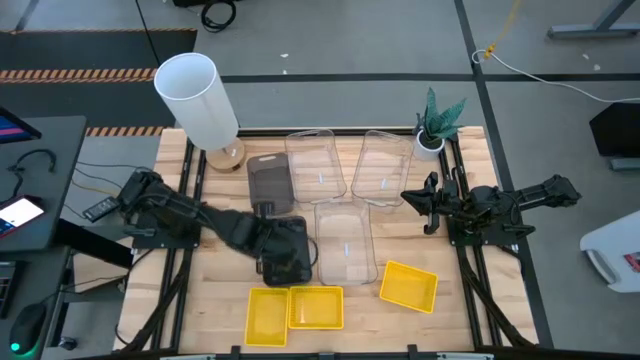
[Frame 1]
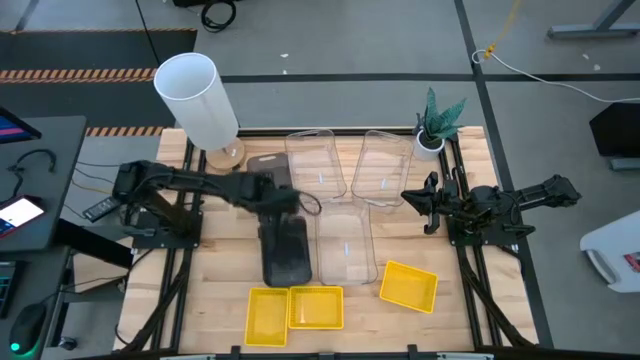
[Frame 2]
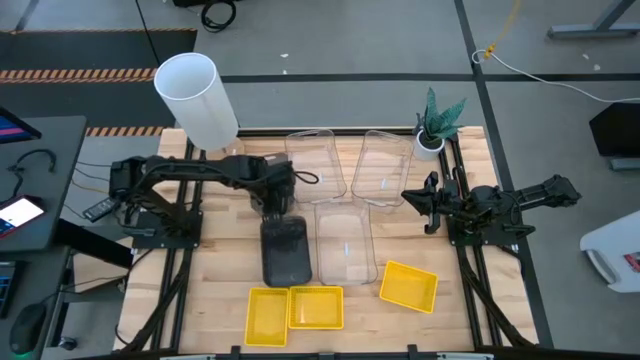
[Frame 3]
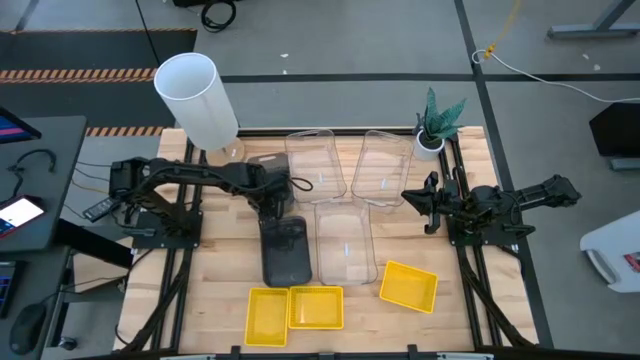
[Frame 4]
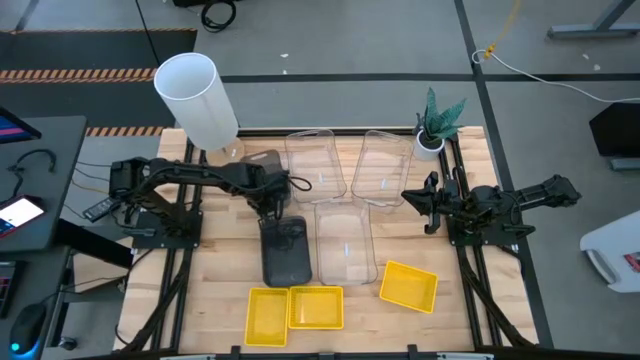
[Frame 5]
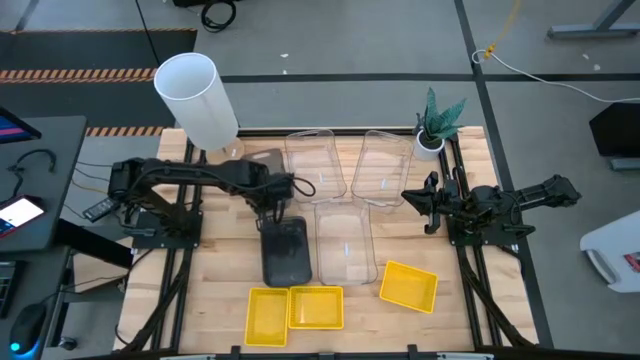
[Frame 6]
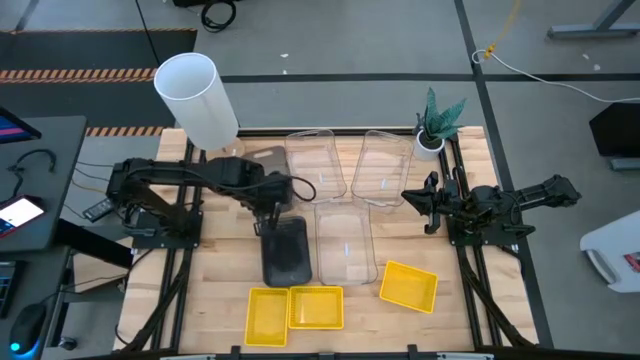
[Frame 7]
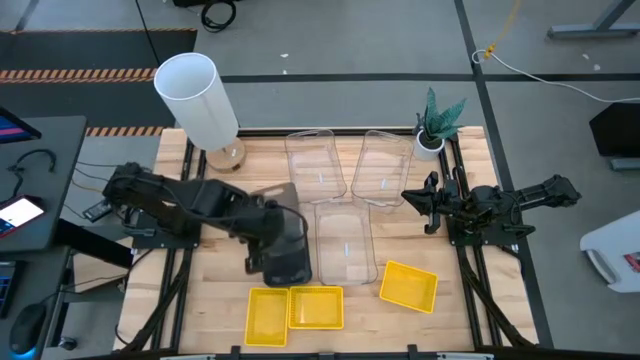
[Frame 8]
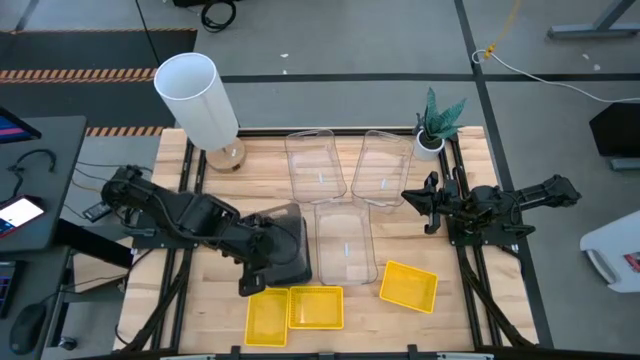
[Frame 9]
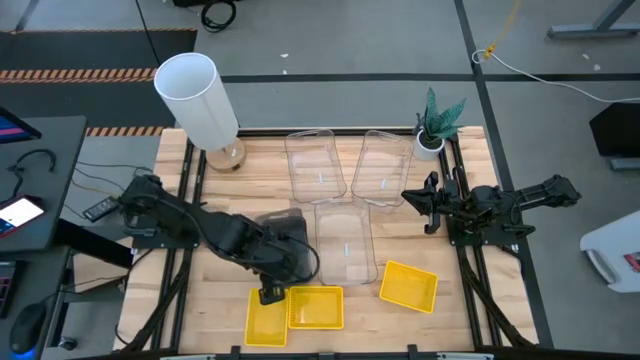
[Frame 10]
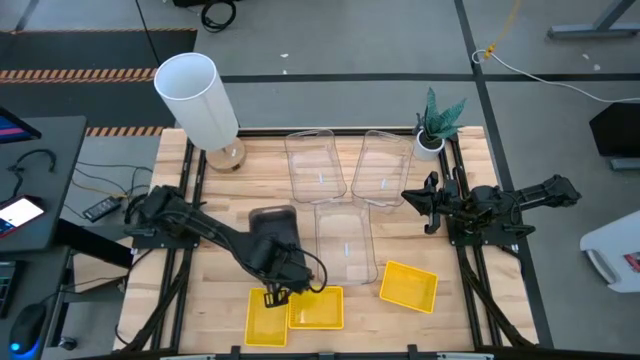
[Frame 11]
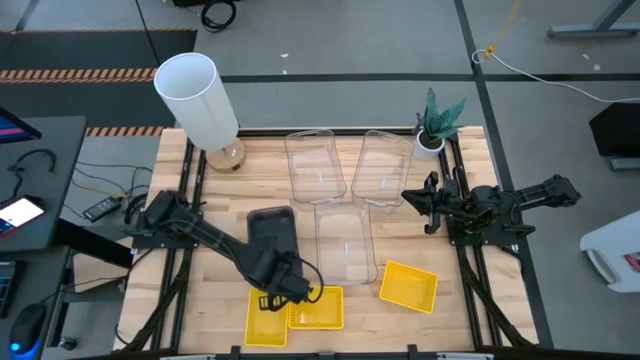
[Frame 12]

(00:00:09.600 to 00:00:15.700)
Stack the top black bin on top of the black bin

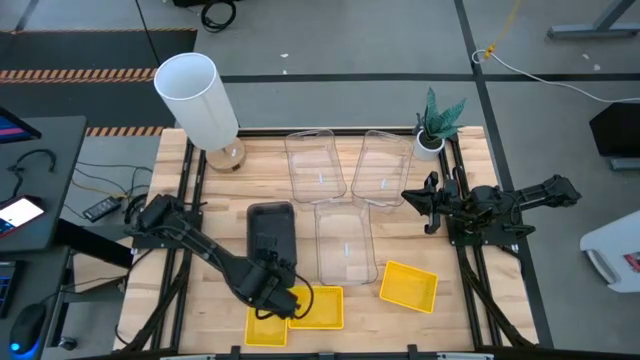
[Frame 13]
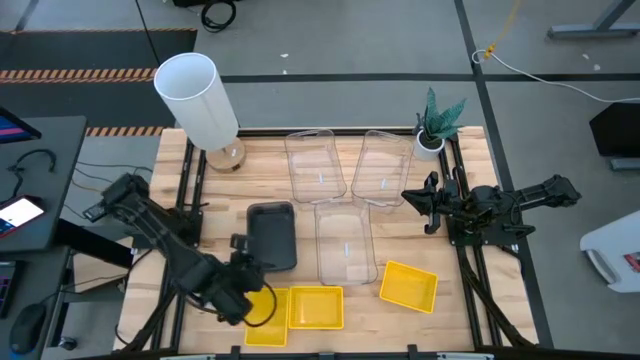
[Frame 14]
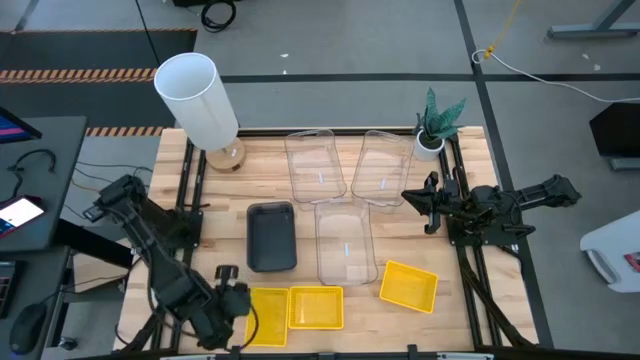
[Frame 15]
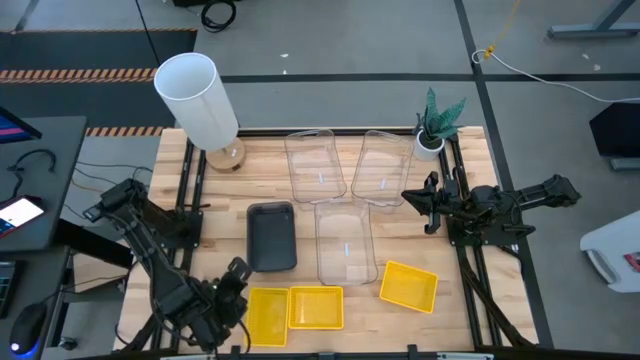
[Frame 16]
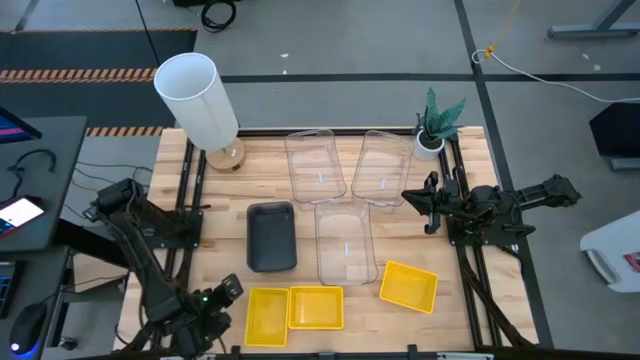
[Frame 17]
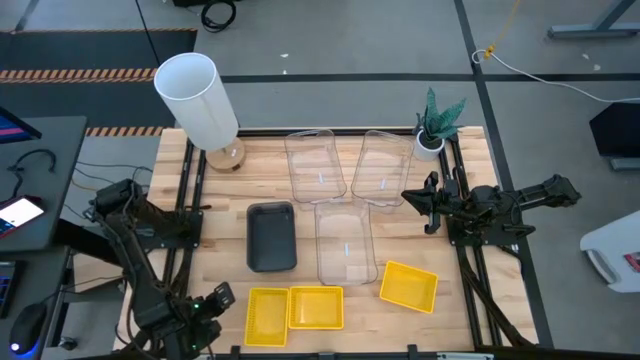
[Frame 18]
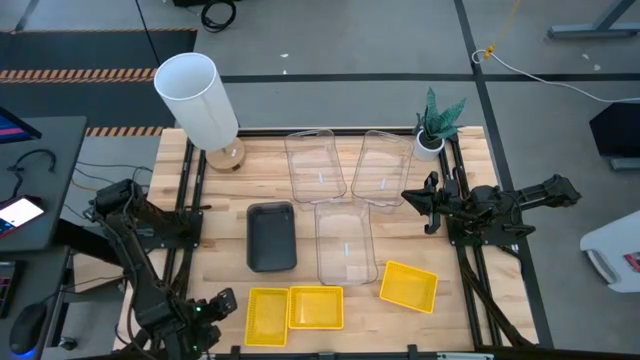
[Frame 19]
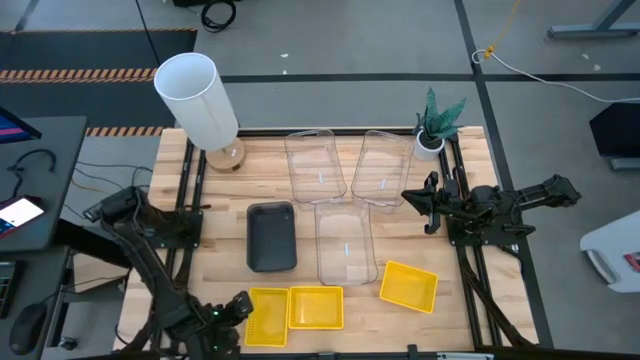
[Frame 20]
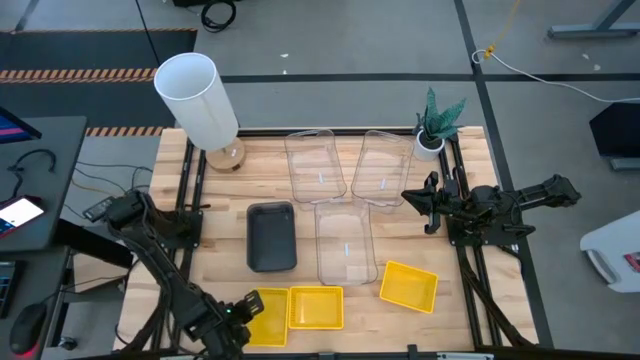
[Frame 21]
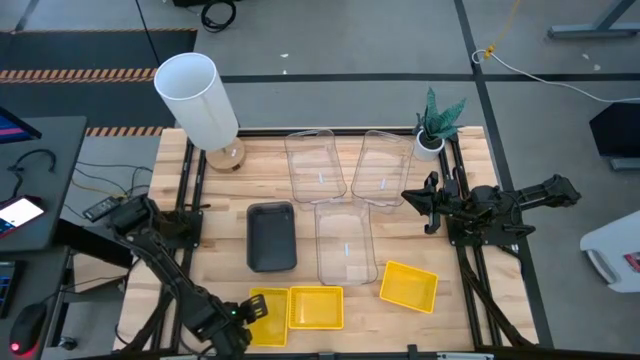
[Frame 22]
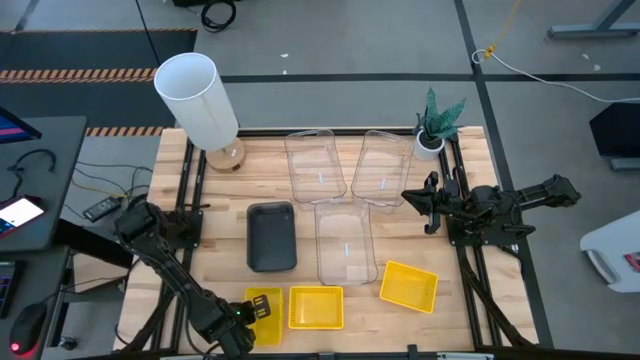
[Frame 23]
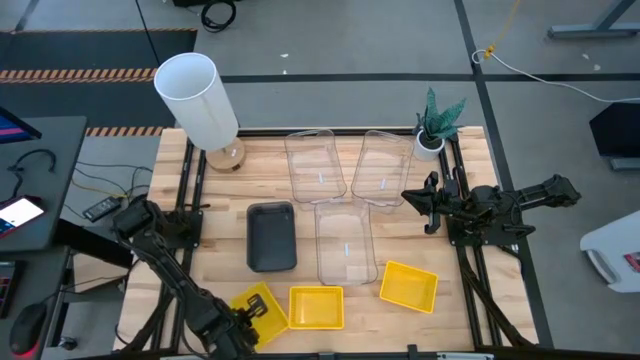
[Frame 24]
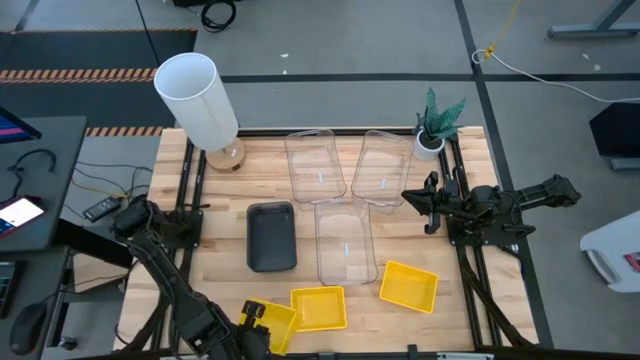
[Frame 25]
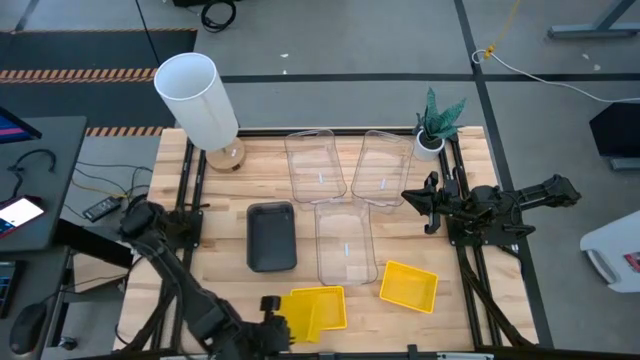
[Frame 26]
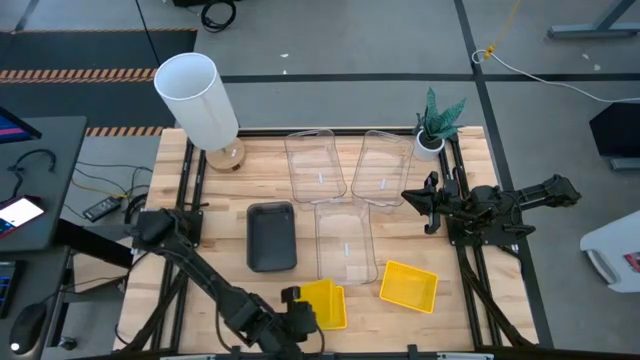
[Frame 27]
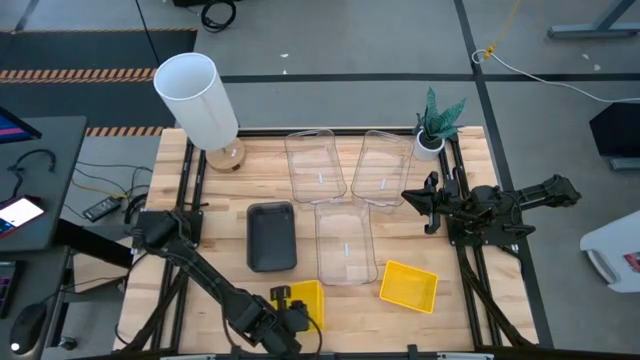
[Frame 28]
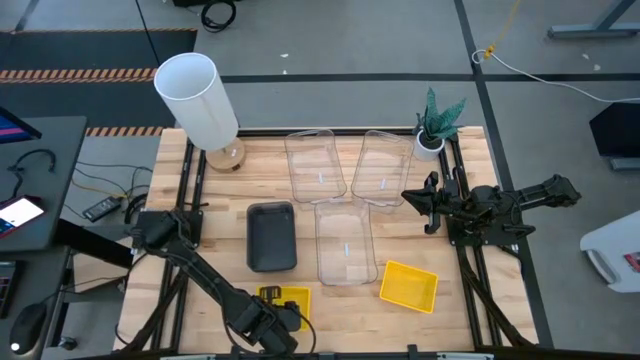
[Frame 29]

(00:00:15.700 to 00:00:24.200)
Stack the left yellow bin on top of the middle yellow bin

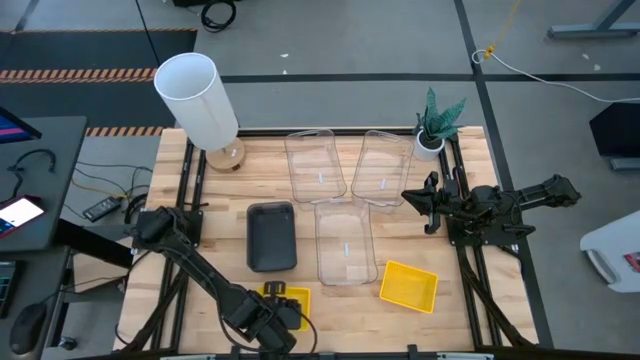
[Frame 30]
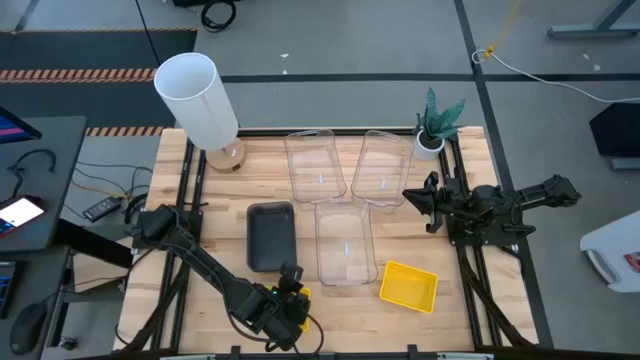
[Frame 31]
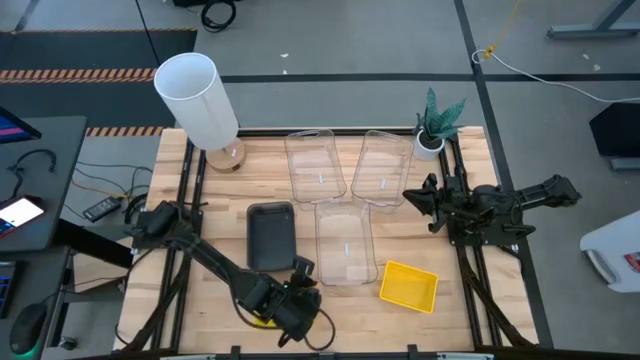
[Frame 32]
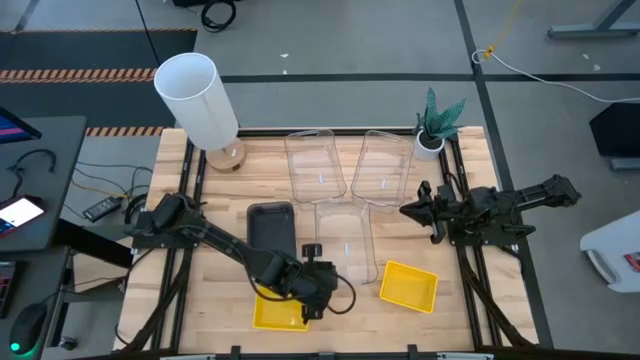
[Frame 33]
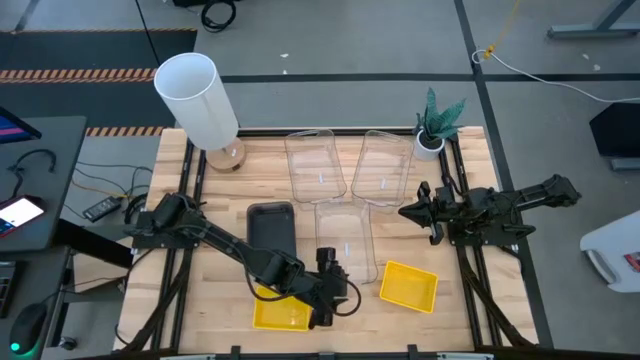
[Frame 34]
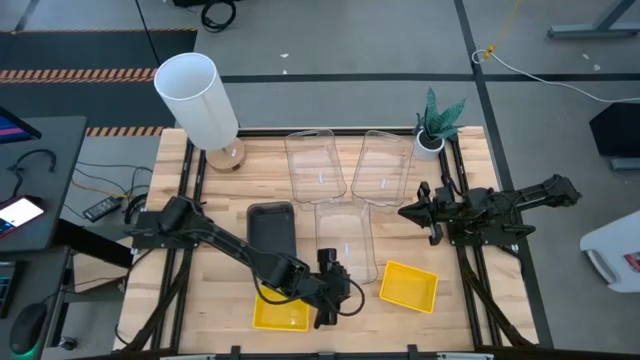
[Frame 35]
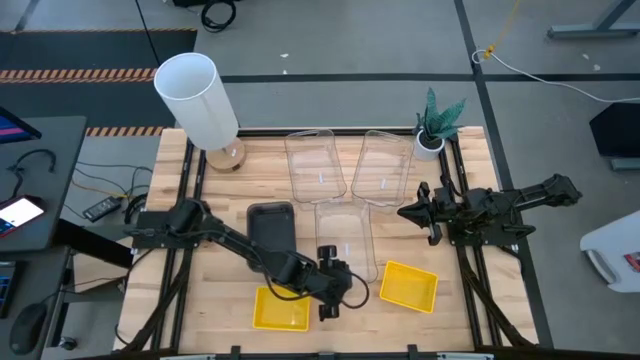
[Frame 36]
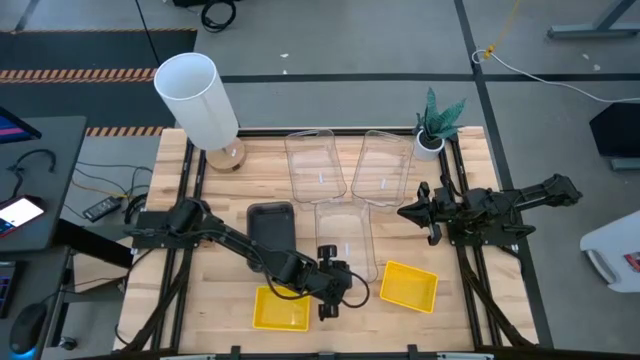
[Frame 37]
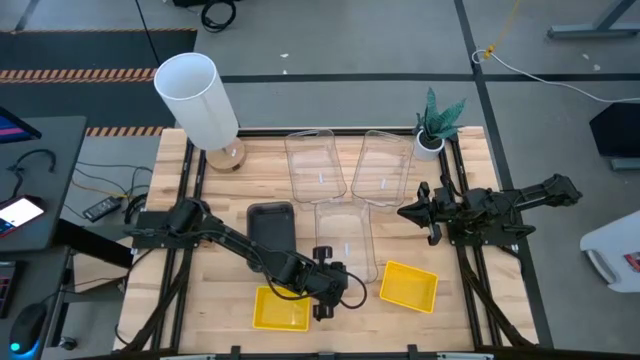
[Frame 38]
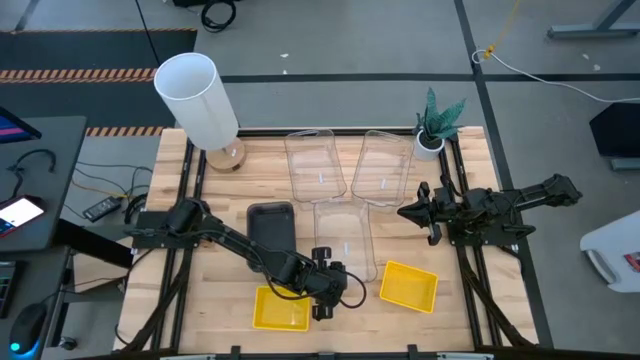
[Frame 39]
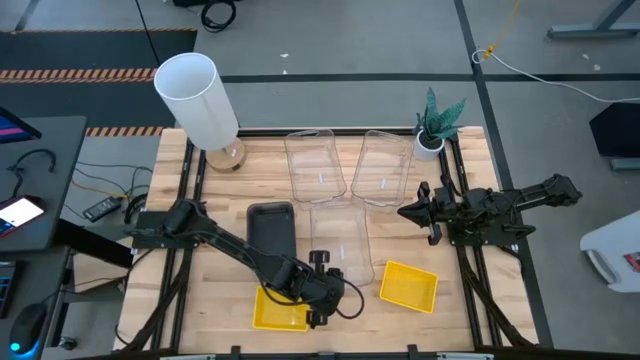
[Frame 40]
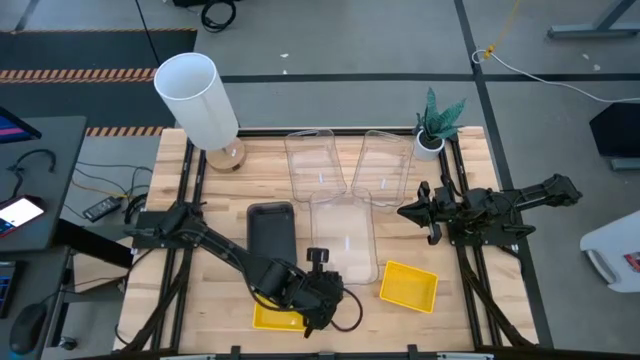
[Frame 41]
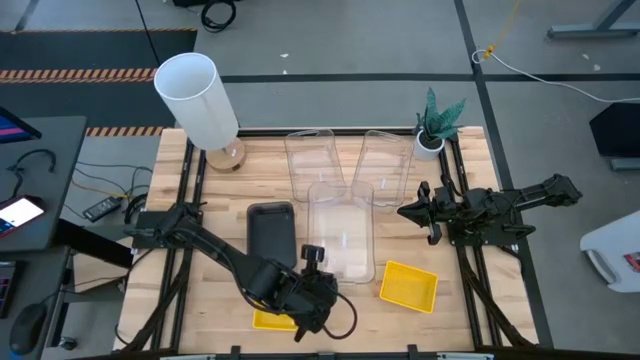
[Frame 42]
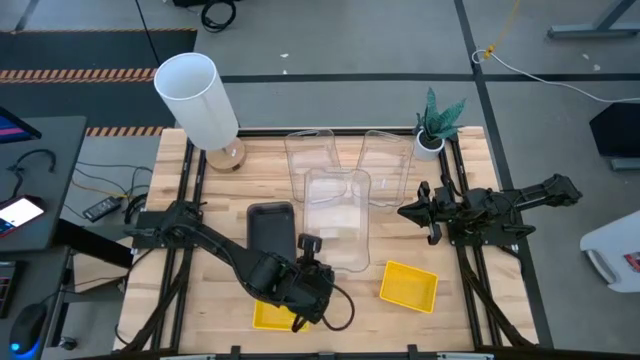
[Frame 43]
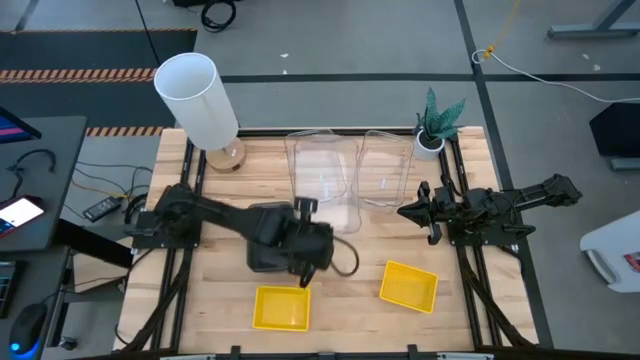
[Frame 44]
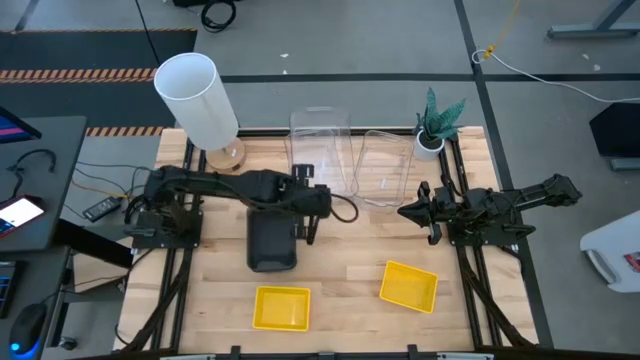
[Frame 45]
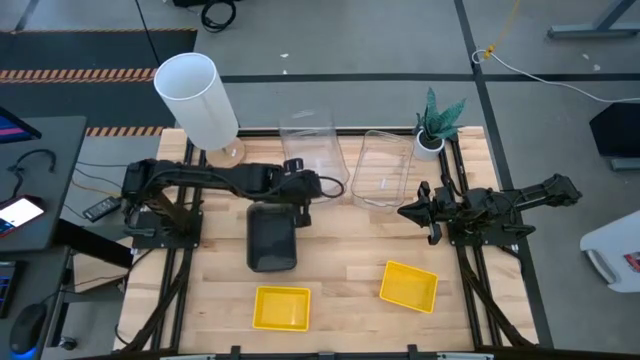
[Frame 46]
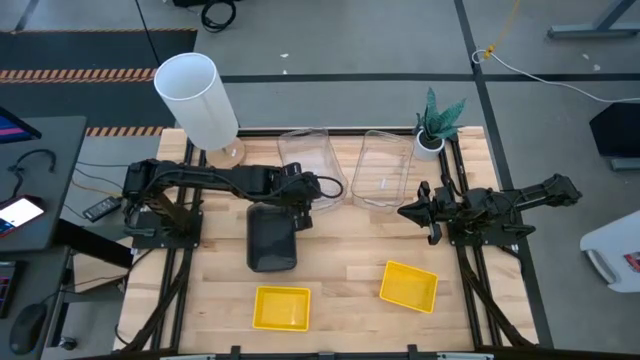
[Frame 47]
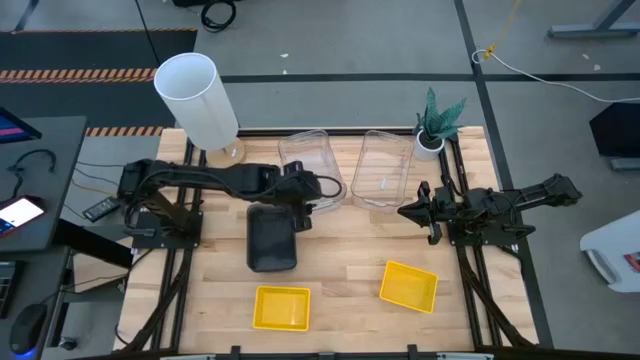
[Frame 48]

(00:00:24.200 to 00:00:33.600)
Stack the bottom transparent bin on top of the top left transparent bin
